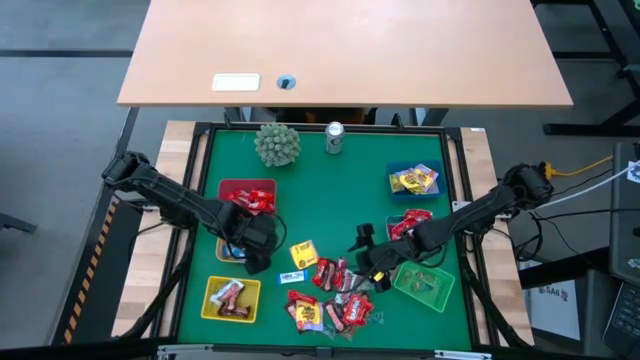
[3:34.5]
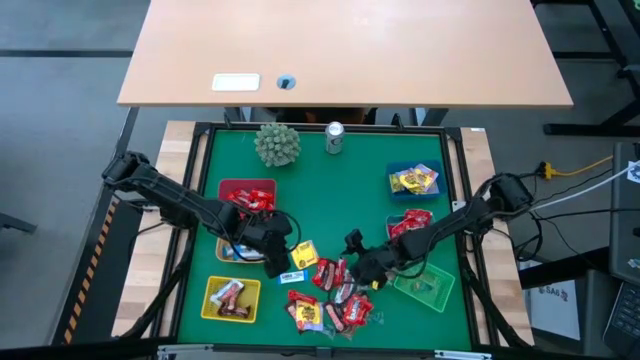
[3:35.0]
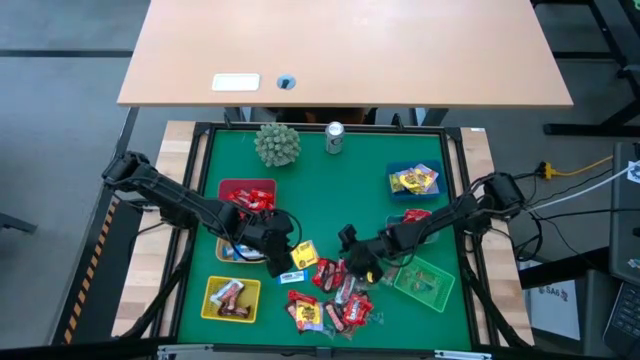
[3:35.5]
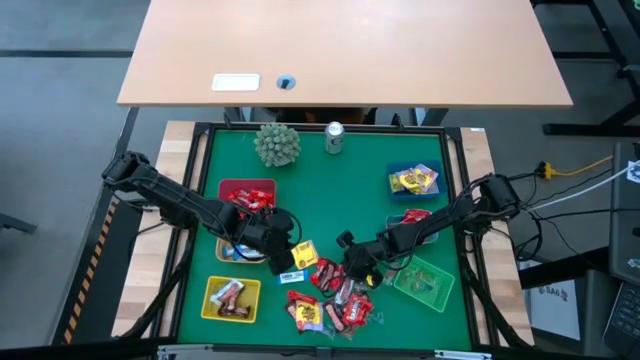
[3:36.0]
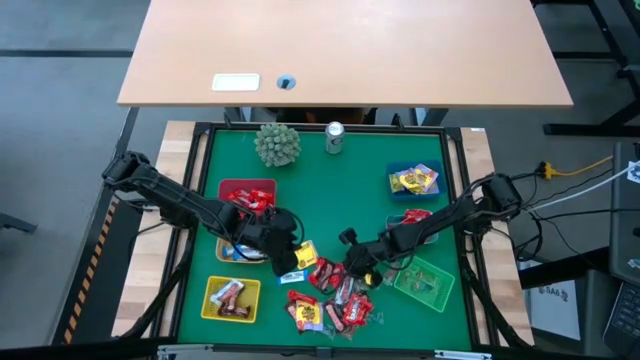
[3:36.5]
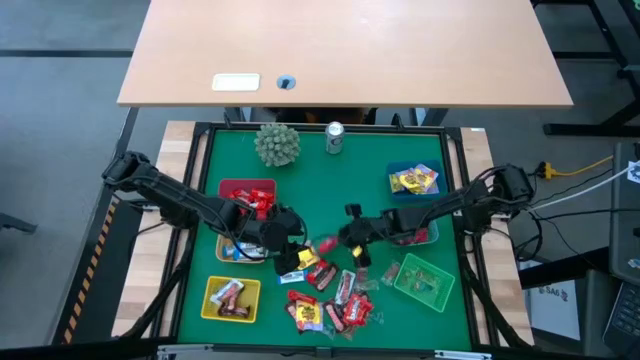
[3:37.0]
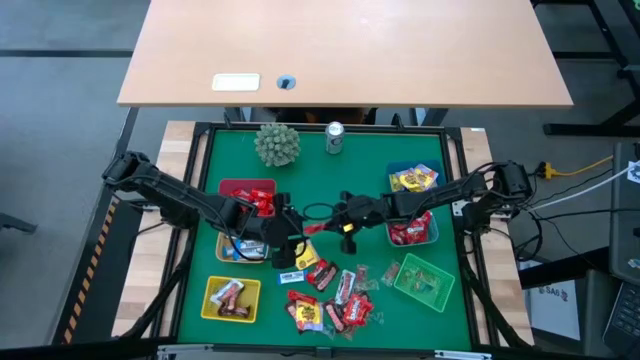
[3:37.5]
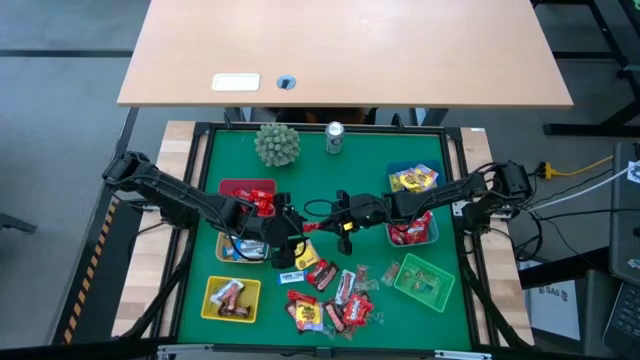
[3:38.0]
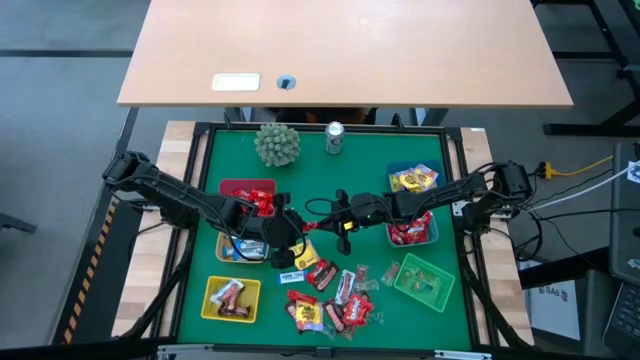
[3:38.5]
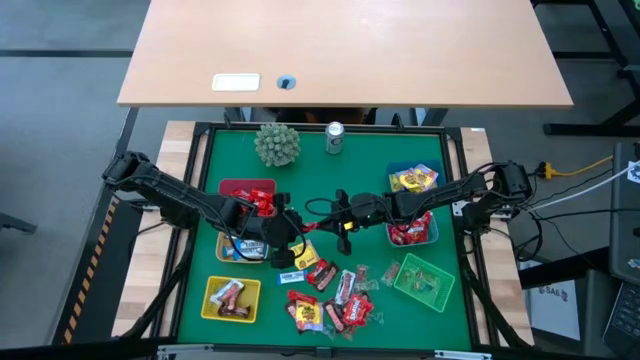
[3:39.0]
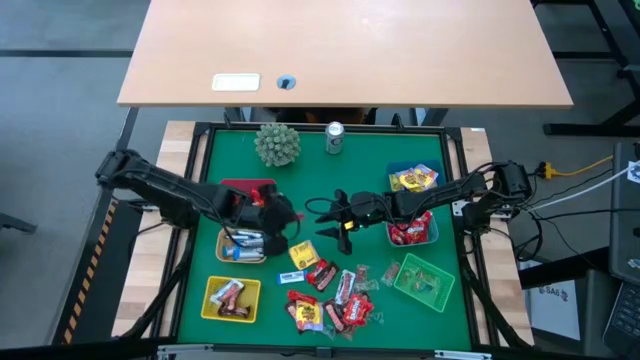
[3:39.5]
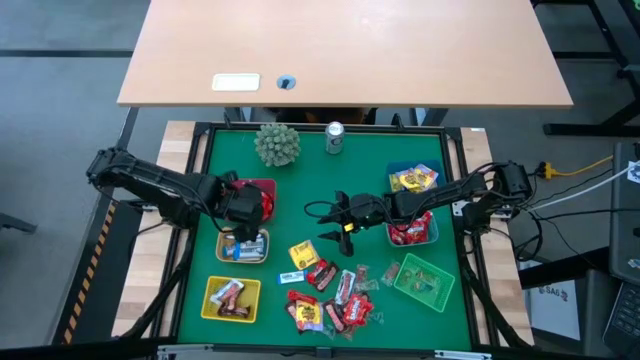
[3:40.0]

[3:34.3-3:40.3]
Task: Sort candy
Put the red chocolate bar into the red bin

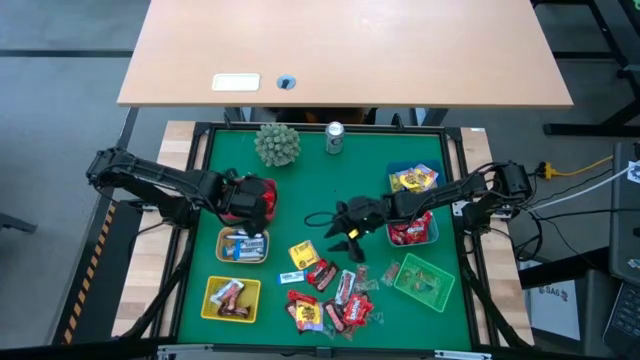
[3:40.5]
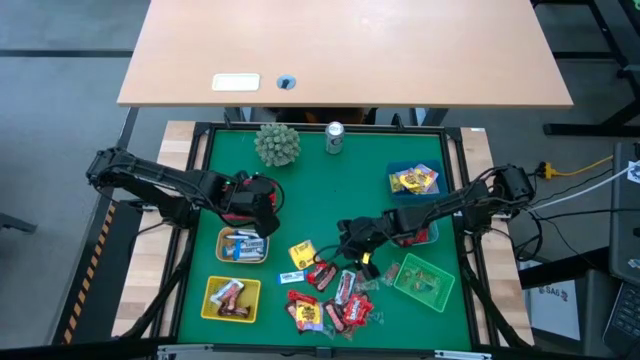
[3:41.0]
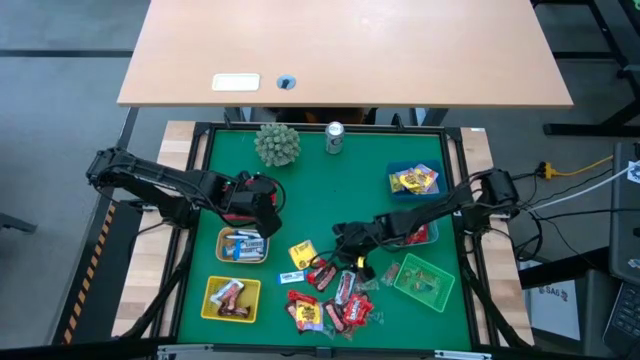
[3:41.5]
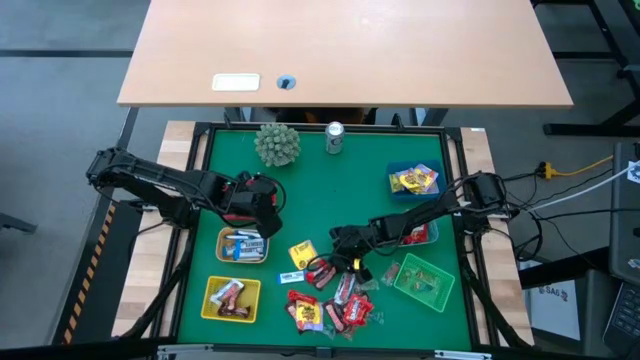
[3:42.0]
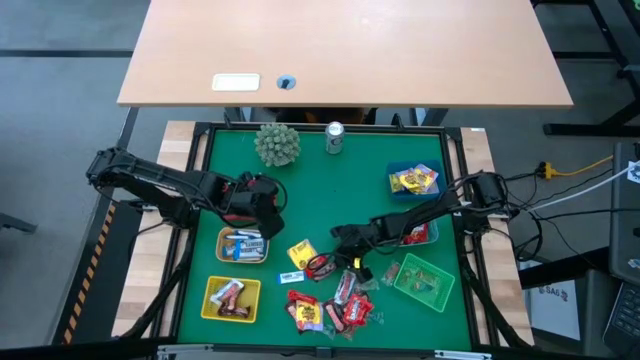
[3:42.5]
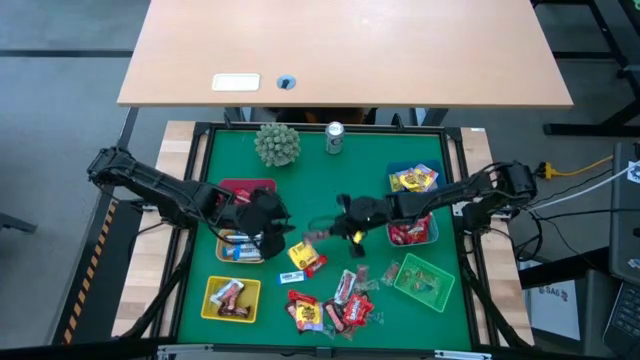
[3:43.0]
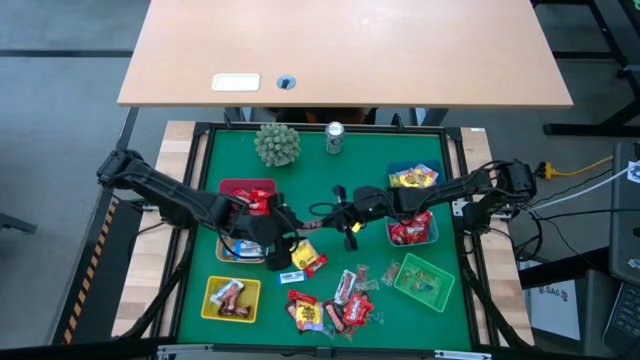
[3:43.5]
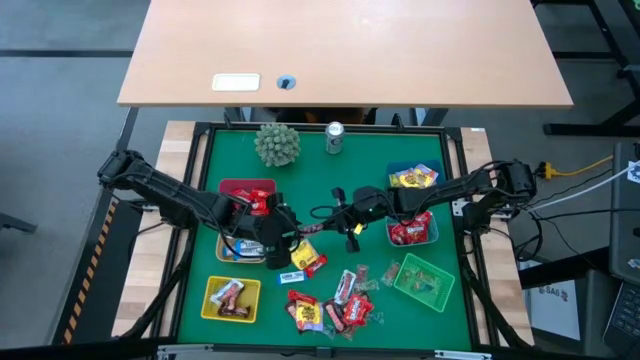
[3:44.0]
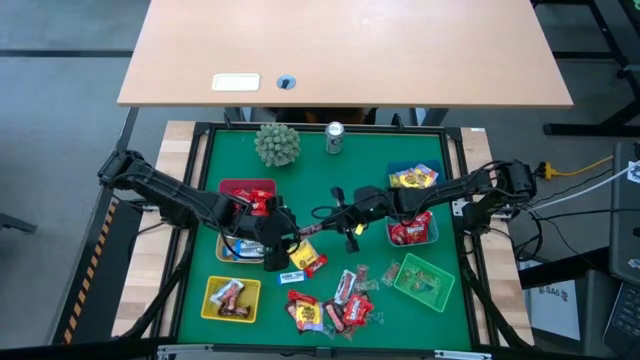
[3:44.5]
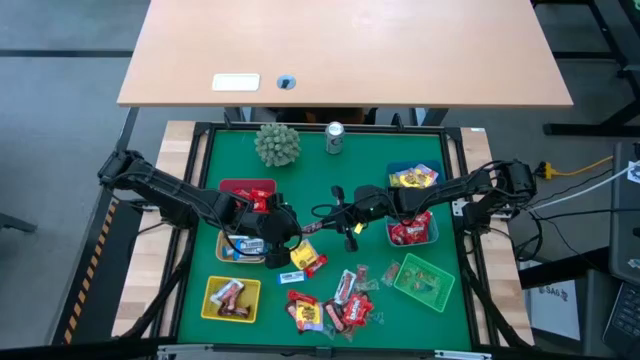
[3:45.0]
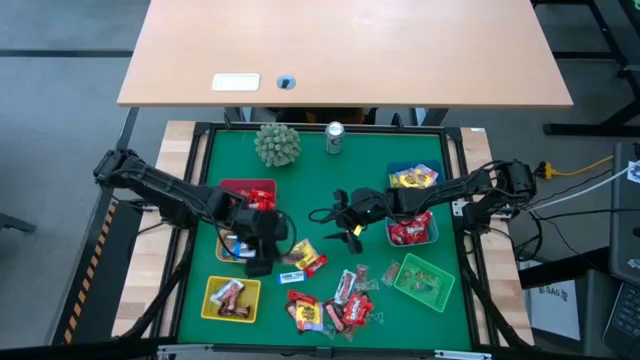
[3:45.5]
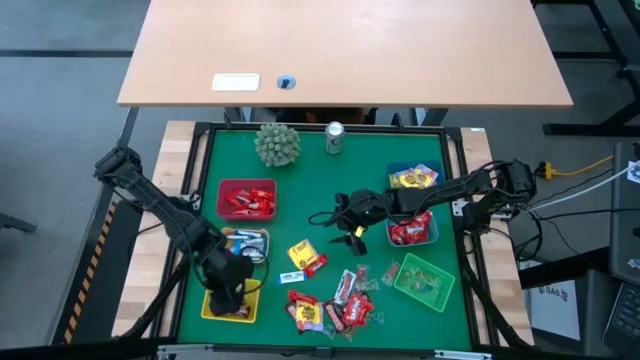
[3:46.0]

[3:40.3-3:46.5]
Put the brown chocolate bar into the yellow bin

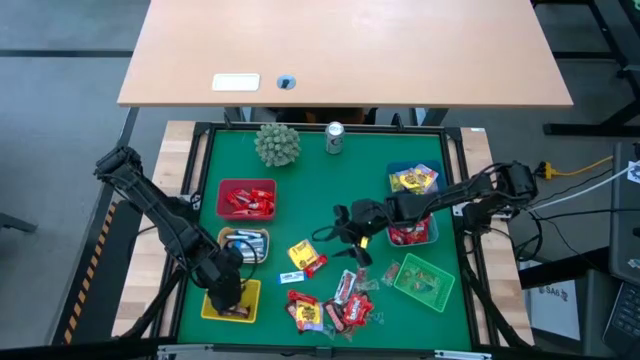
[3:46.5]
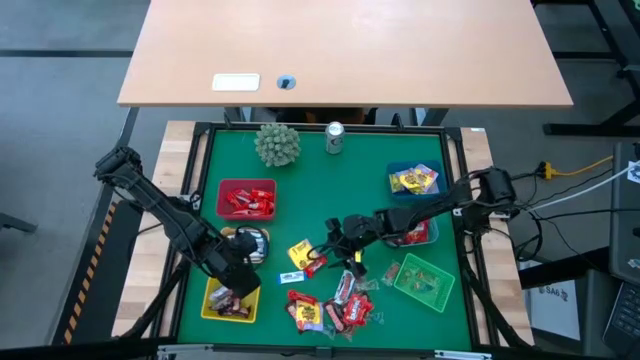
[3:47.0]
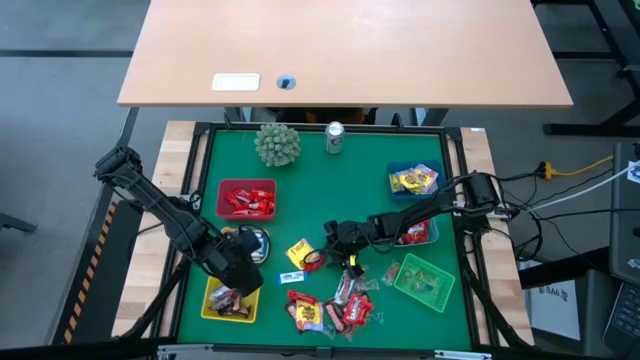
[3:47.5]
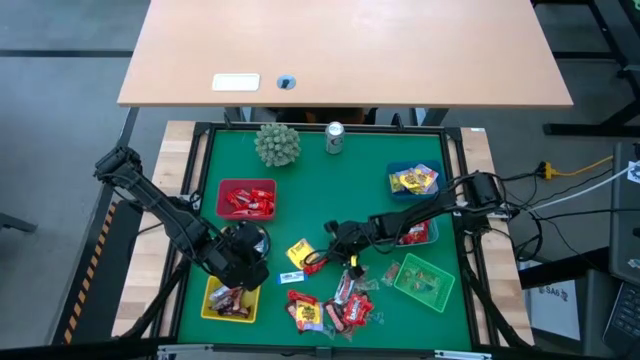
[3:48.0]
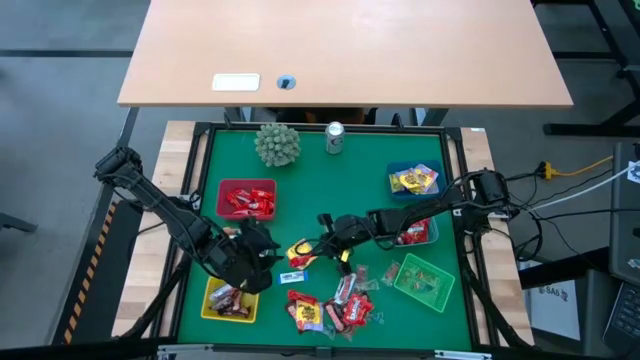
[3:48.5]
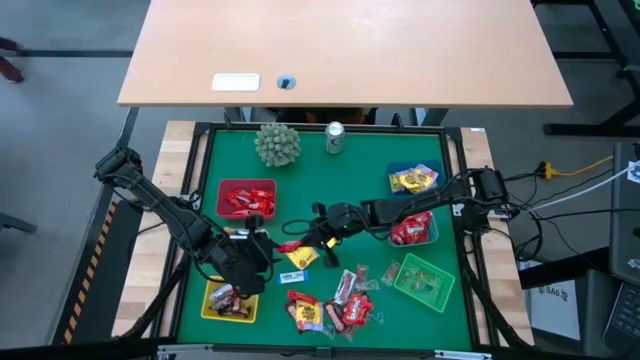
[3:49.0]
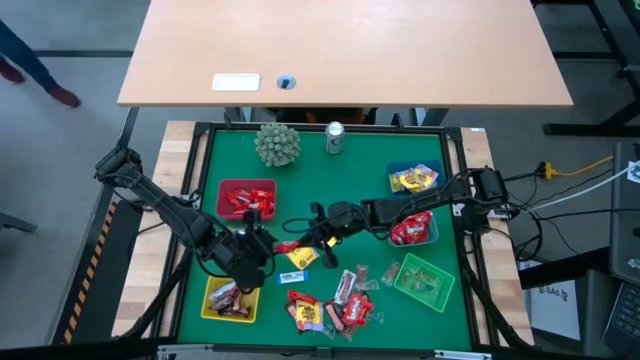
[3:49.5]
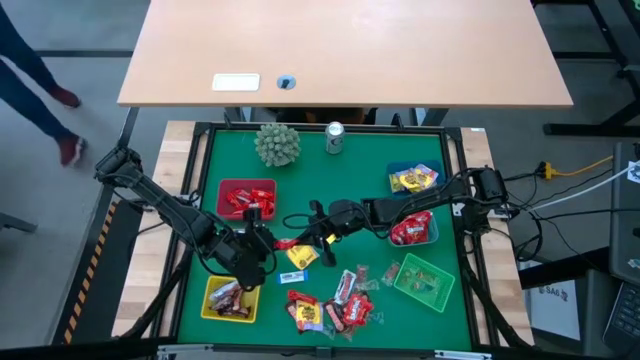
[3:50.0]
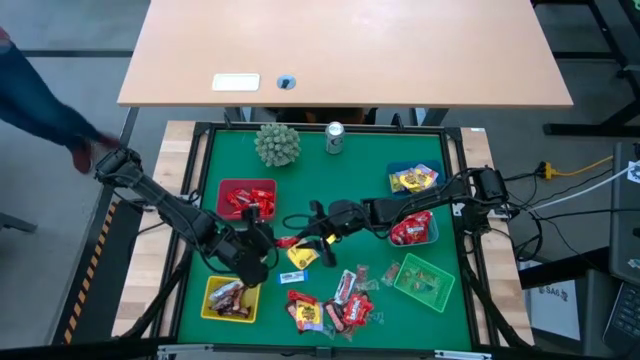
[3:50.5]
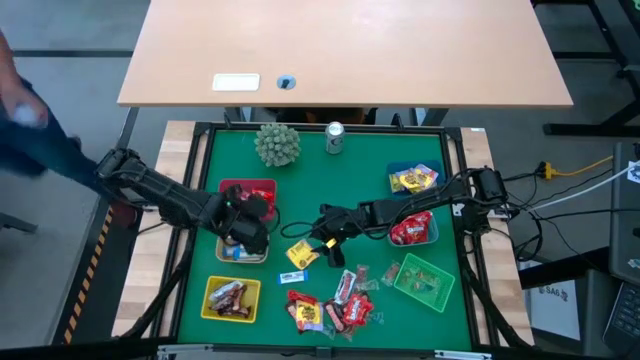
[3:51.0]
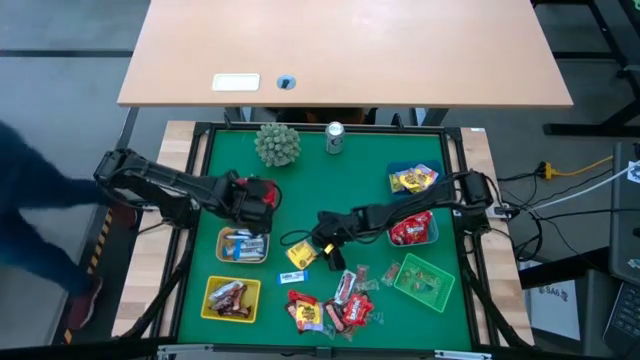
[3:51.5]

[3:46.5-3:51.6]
Put the red chocolate bar into the red bin

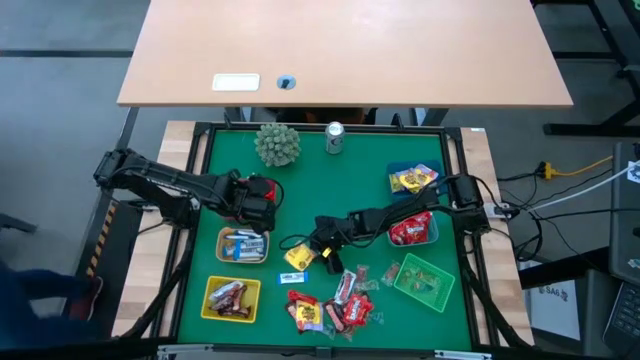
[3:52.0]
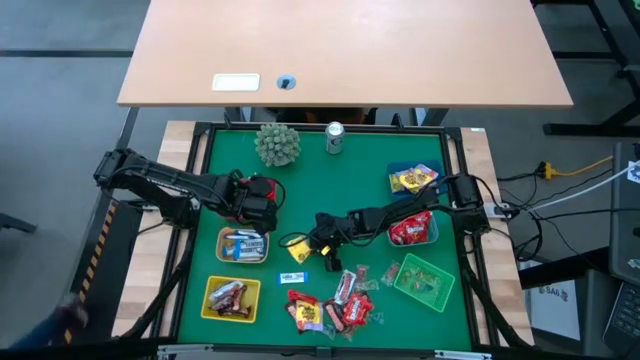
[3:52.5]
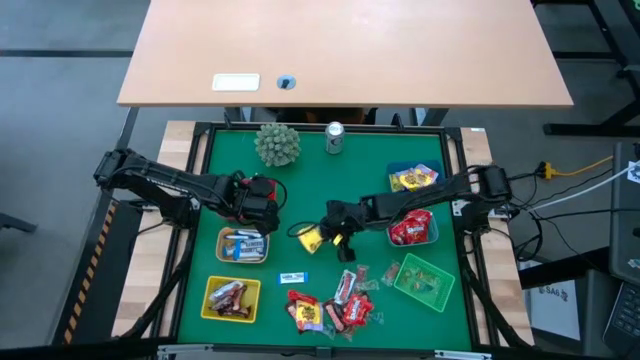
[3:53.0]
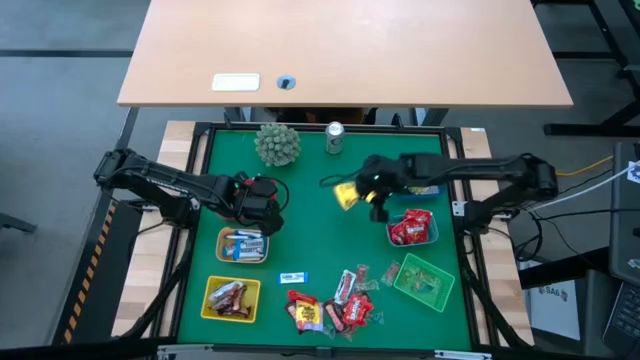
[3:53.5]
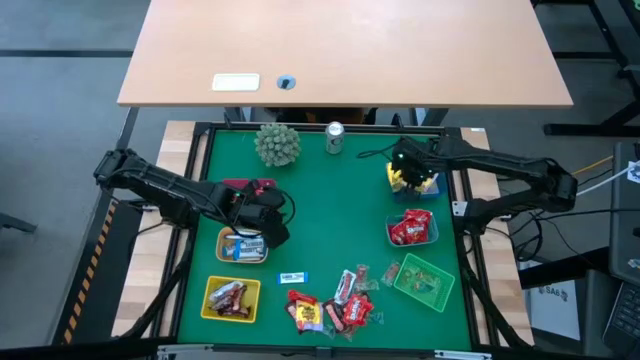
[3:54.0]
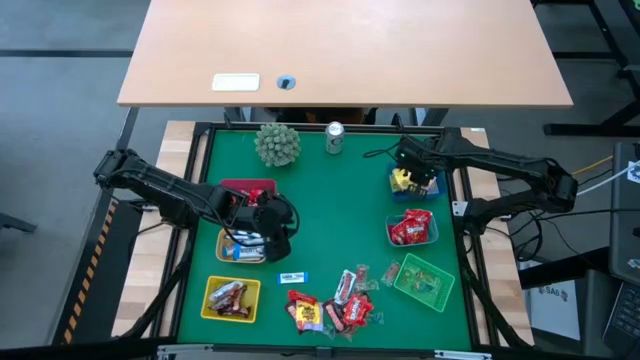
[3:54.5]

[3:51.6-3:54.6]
Put the yellow candy into the dark blue bin
